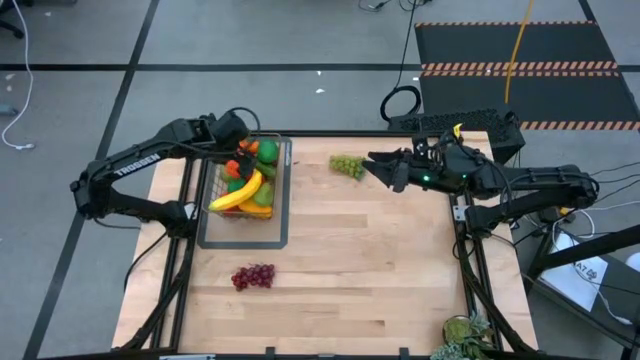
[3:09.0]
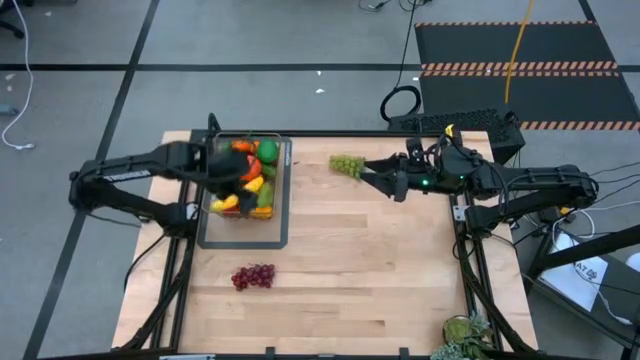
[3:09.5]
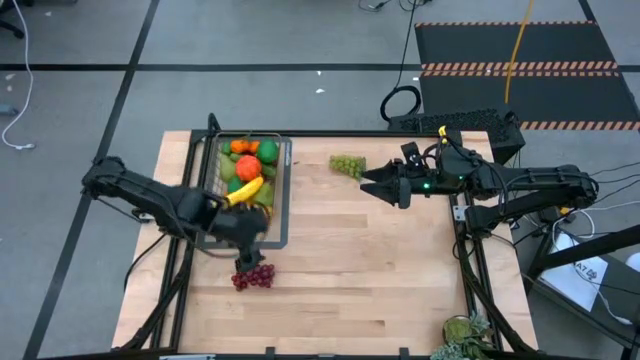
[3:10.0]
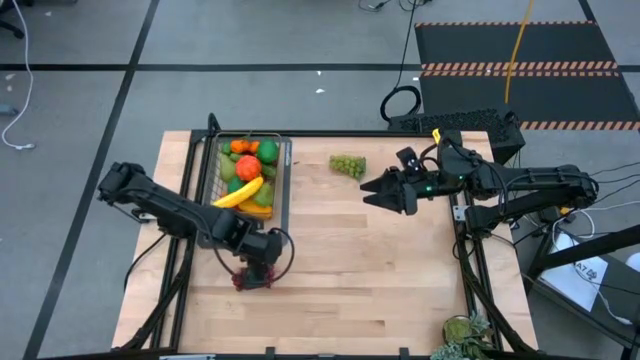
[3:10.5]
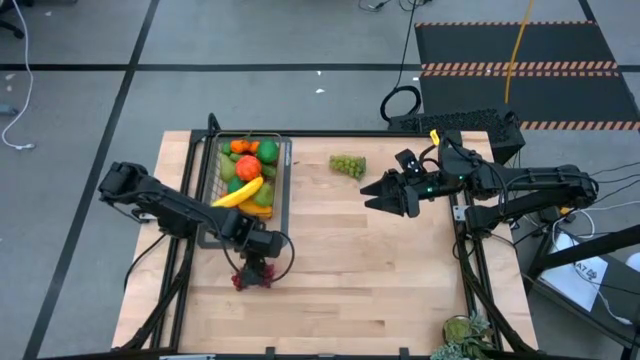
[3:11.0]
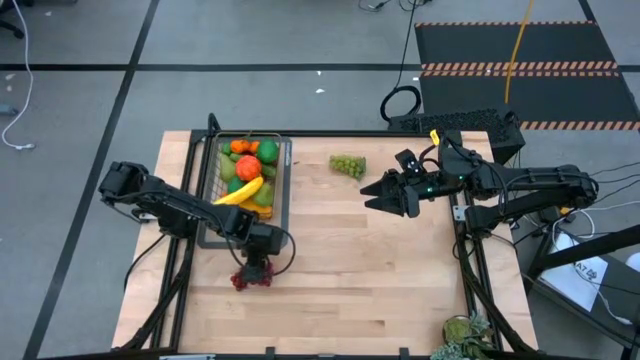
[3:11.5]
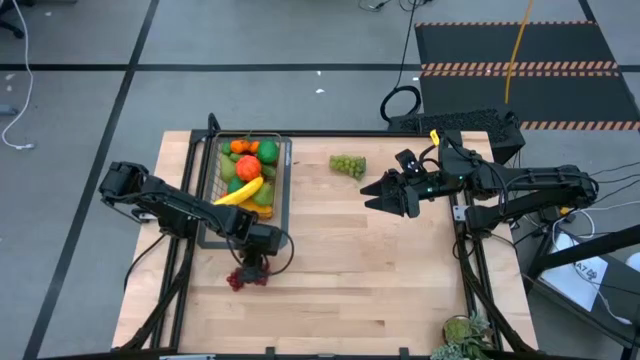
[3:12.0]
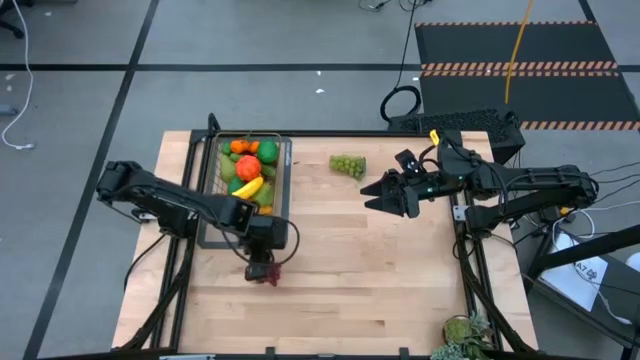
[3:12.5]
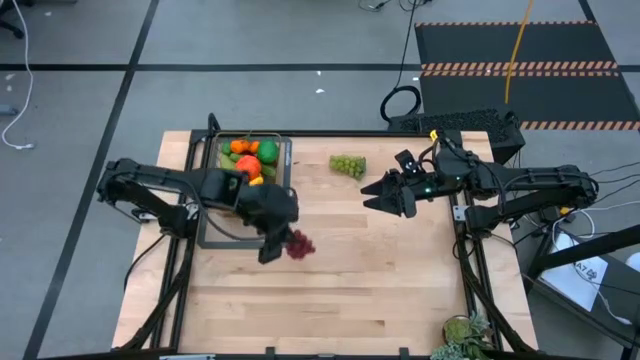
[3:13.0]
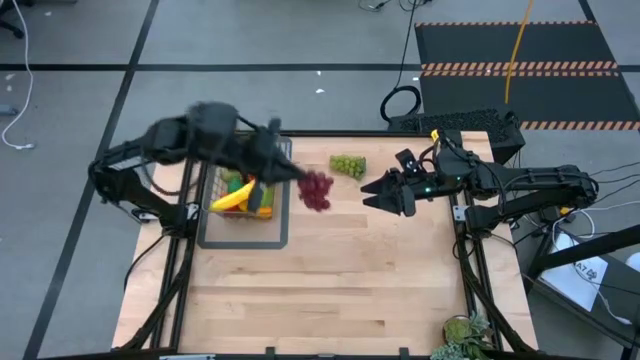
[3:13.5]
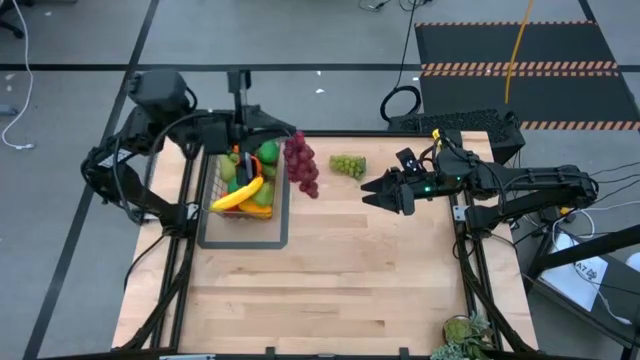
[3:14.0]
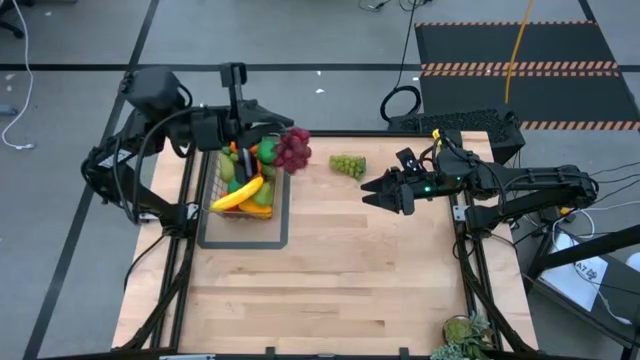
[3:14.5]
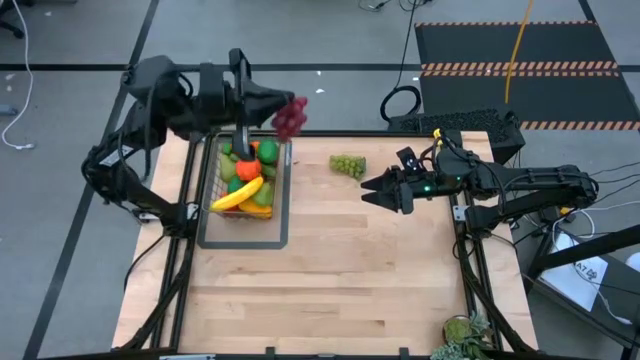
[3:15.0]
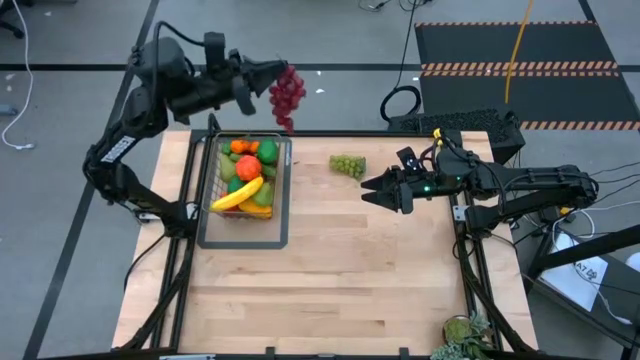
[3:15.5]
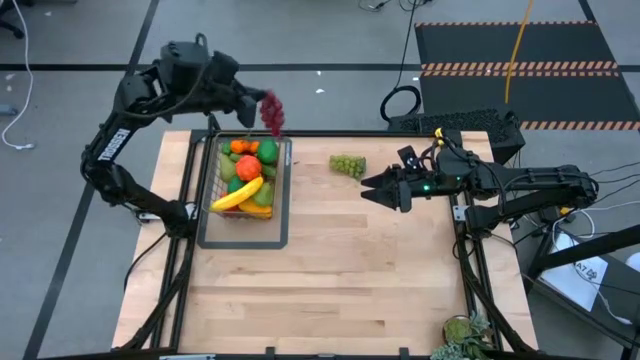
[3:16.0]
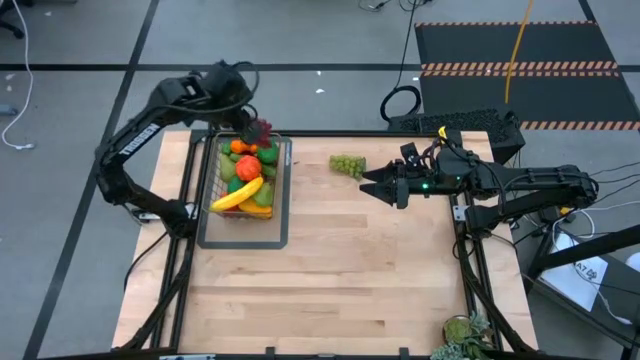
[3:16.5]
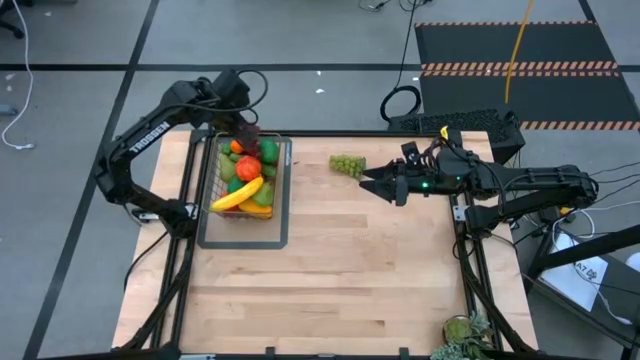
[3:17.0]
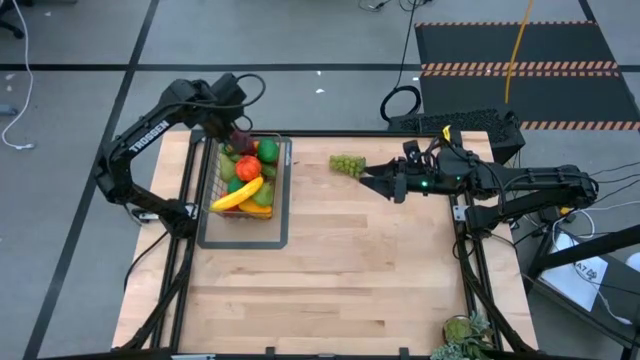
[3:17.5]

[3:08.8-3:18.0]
Task: Build produce basket
Put the red grapes into the wire basket

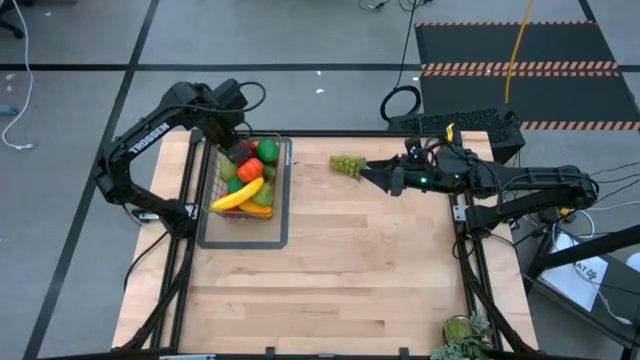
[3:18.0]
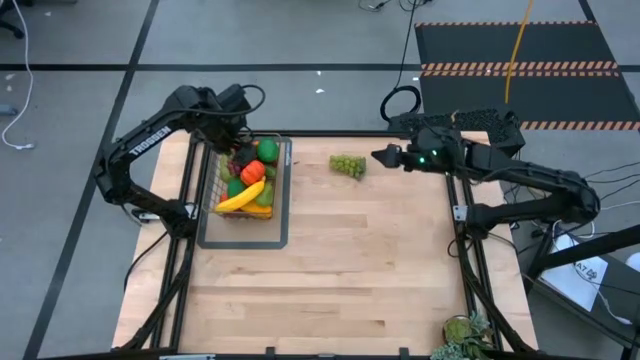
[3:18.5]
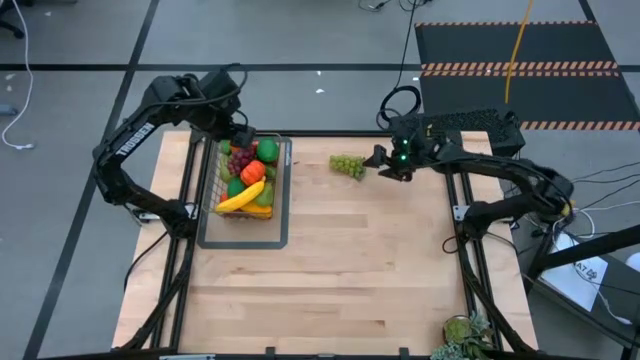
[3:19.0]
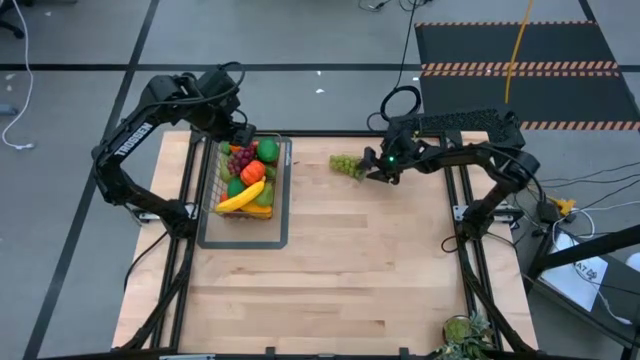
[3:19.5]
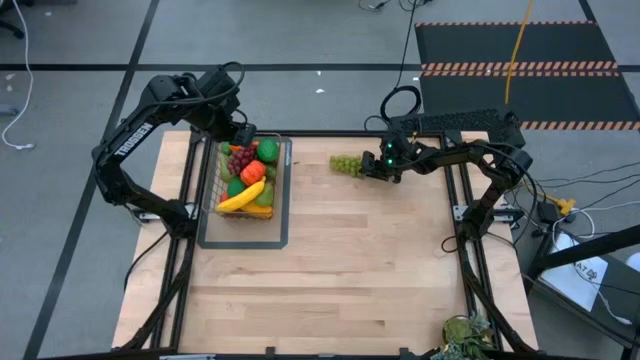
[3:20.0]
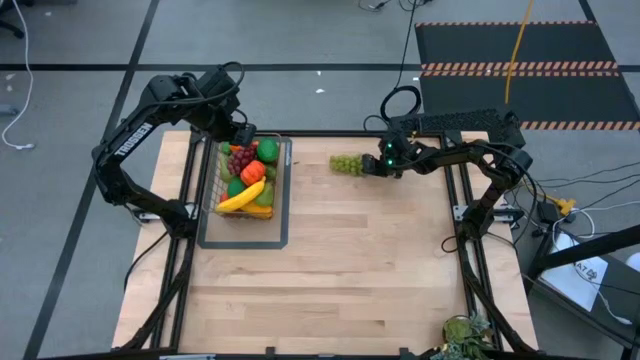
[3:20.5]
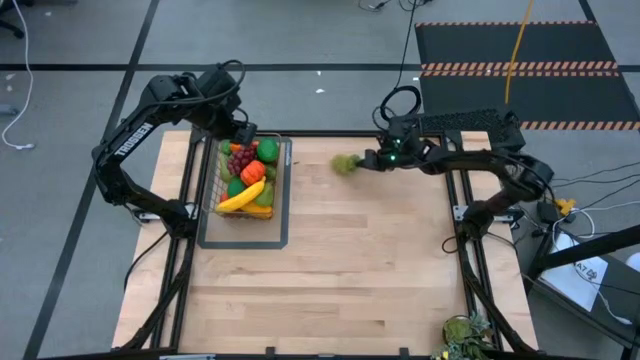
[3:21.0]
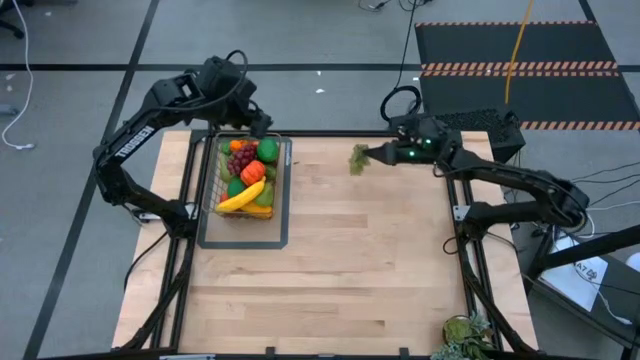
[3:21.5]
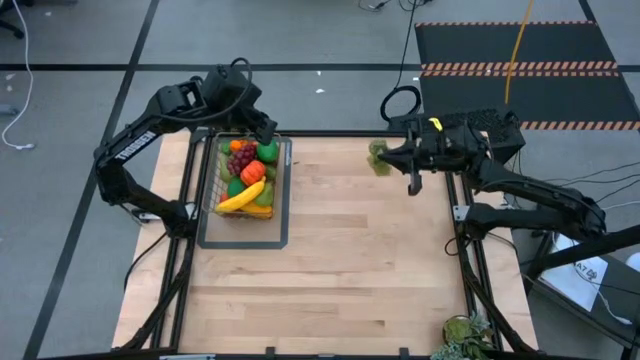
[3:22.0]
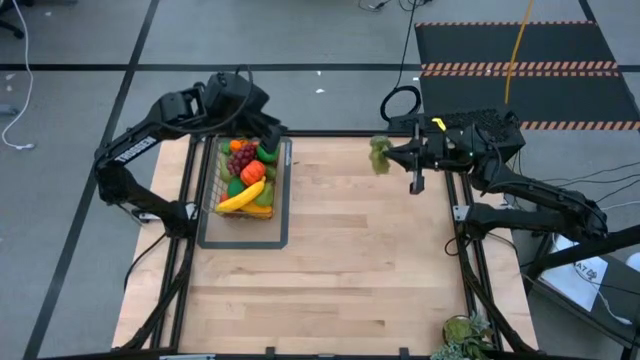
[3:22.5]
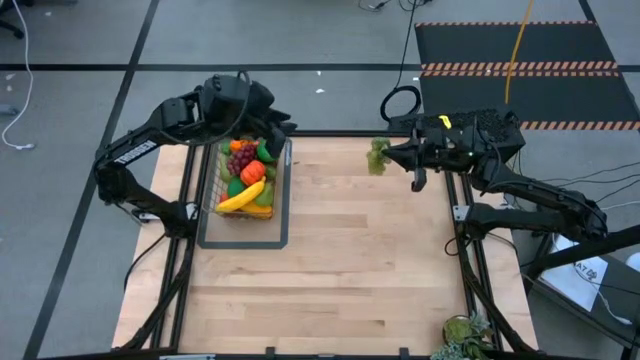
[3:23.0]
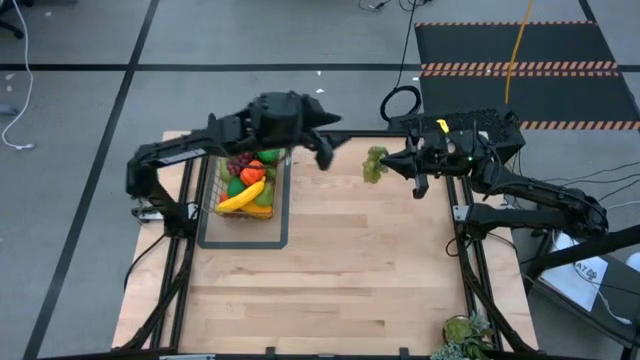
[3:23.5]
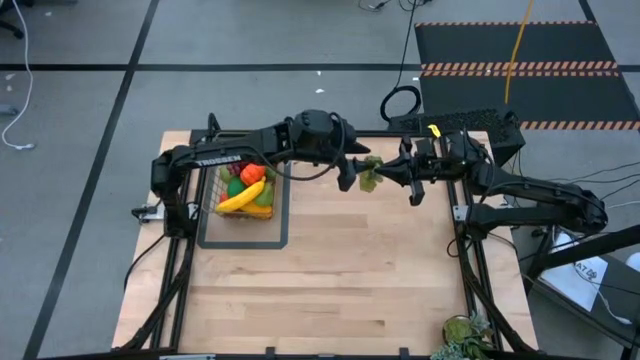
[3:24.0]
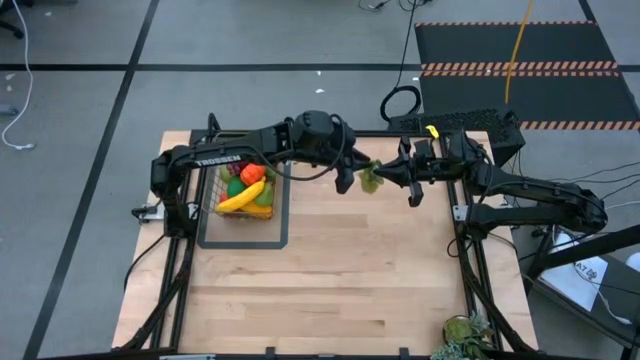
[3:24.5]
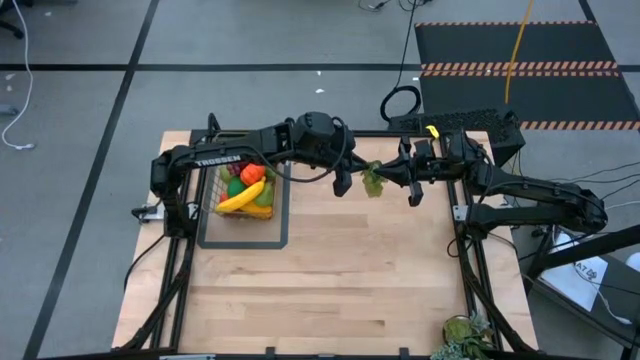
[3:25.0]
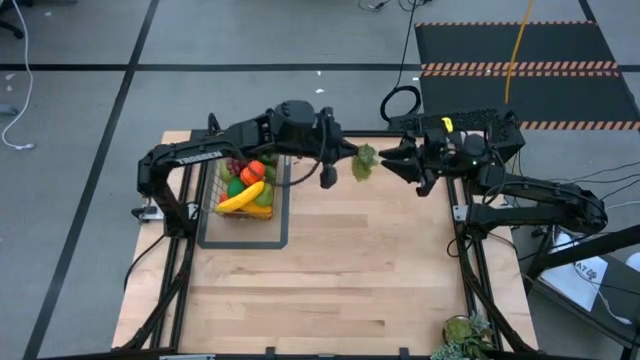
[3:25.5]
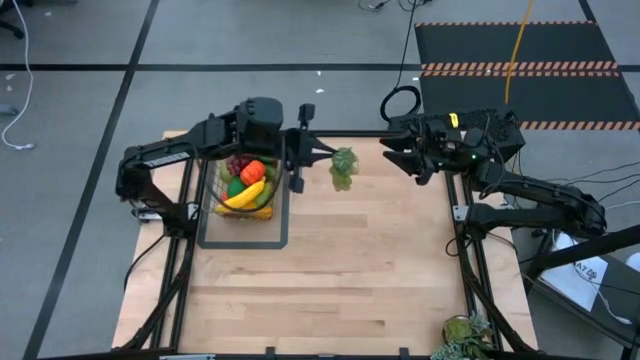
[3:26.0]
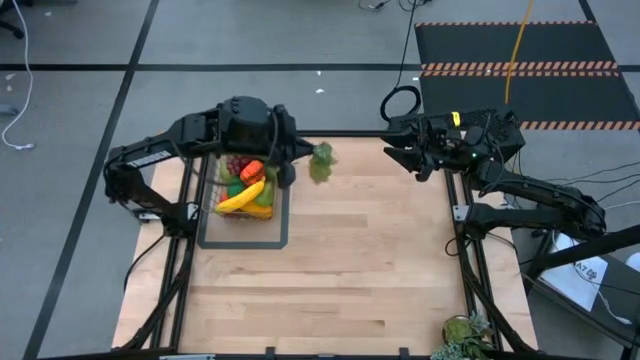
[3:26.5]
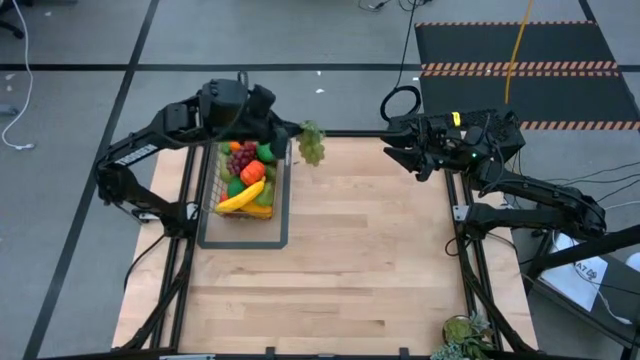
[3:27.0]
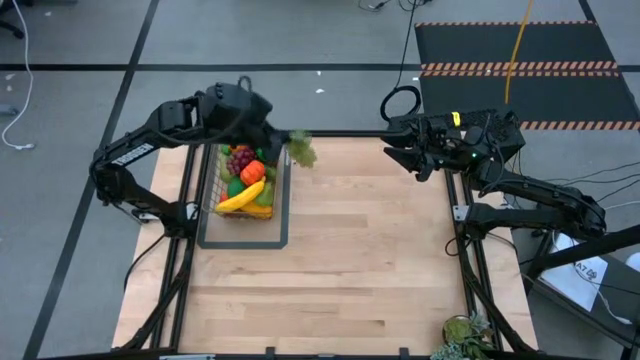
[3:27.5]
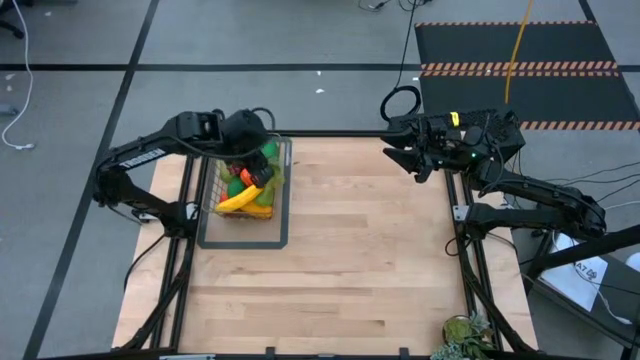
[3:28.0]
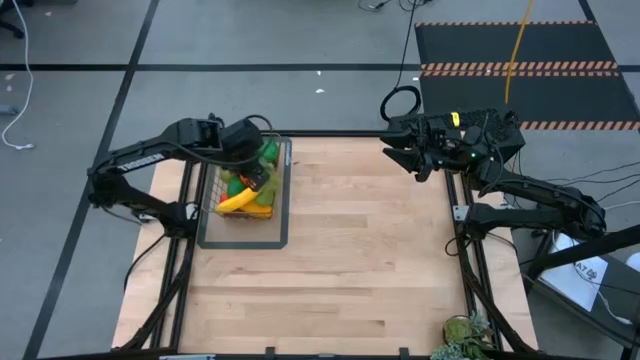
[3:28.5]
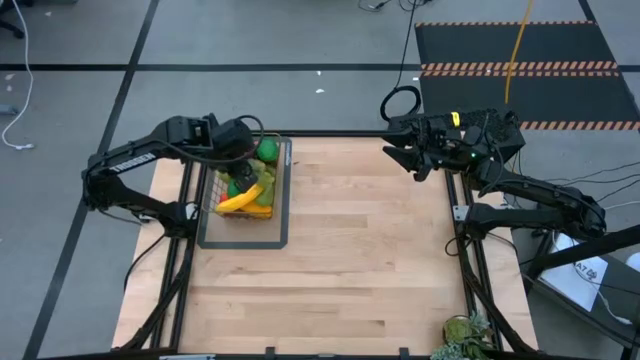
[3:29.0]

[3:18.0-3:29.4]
Put the green grapes into the wire basket
